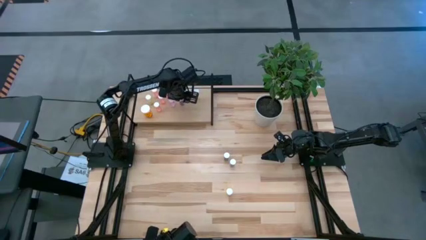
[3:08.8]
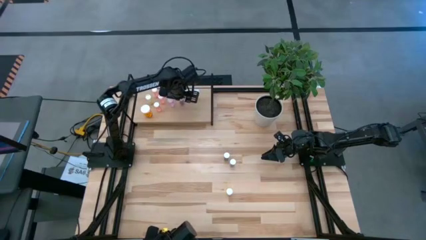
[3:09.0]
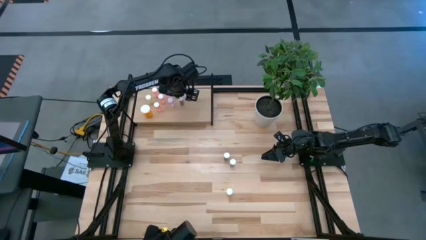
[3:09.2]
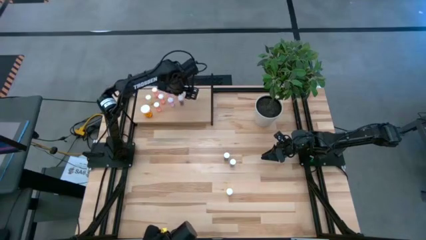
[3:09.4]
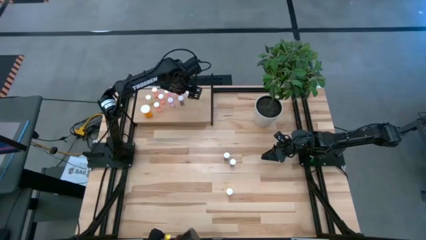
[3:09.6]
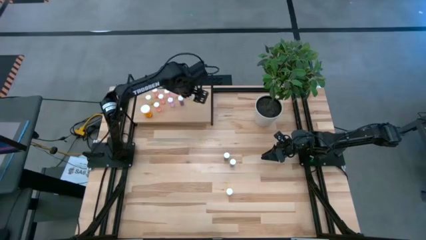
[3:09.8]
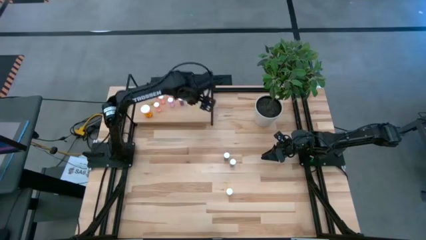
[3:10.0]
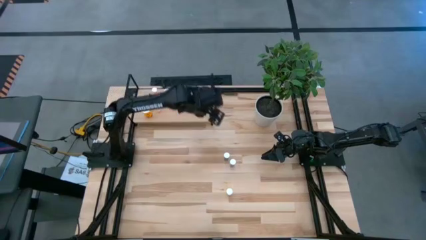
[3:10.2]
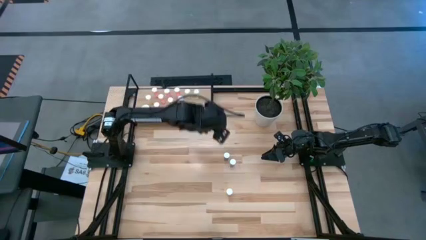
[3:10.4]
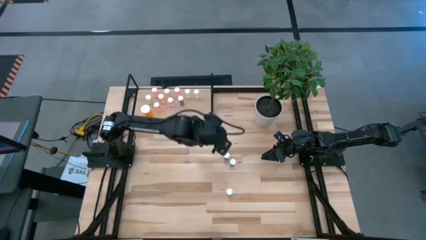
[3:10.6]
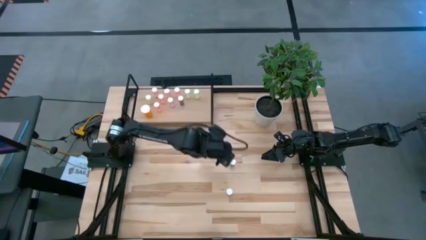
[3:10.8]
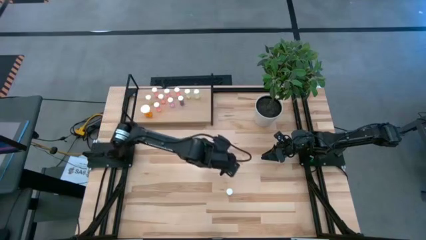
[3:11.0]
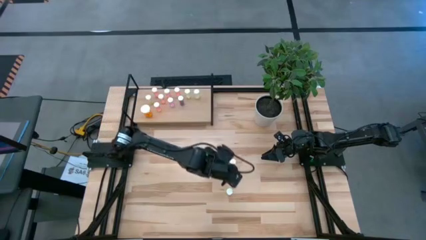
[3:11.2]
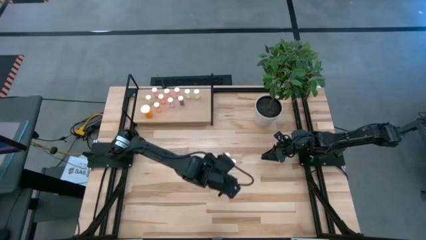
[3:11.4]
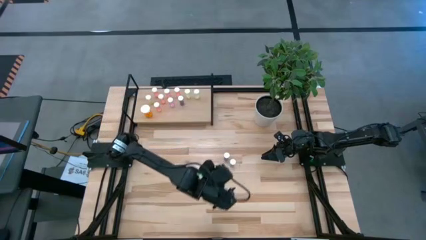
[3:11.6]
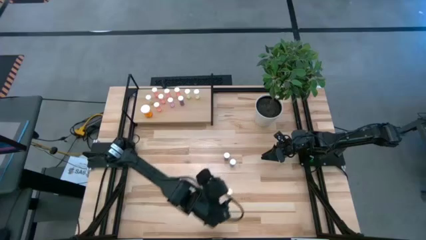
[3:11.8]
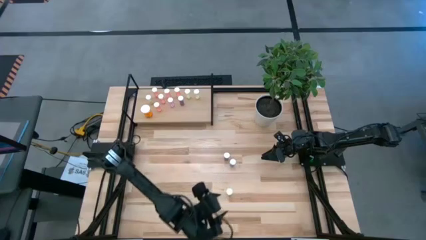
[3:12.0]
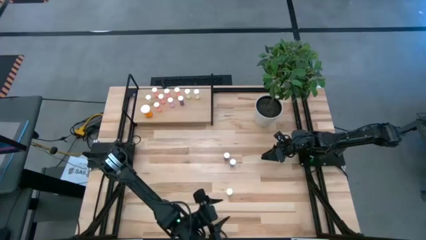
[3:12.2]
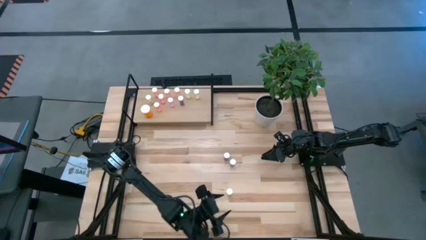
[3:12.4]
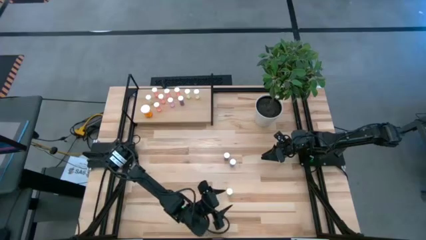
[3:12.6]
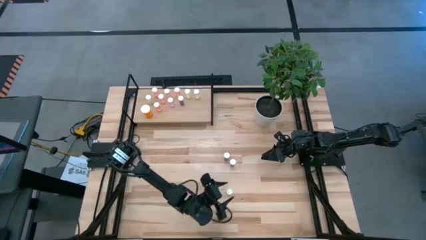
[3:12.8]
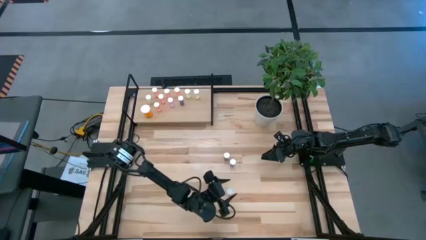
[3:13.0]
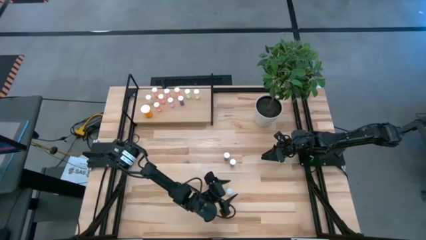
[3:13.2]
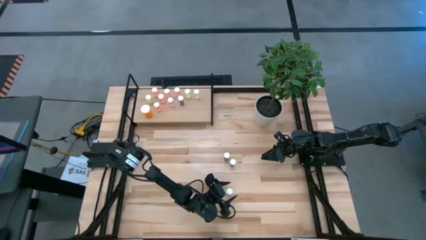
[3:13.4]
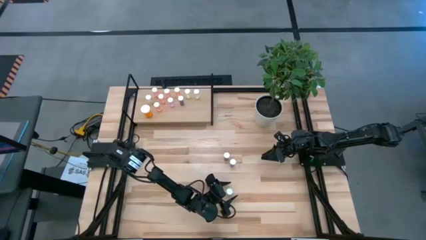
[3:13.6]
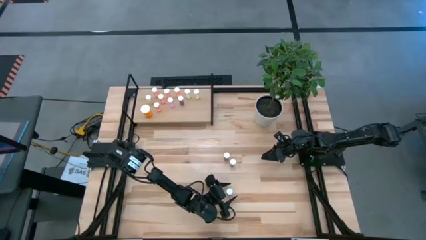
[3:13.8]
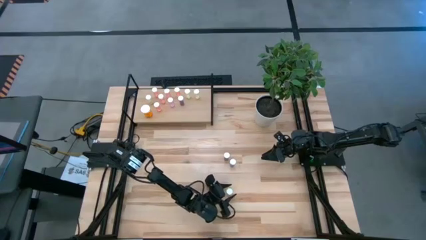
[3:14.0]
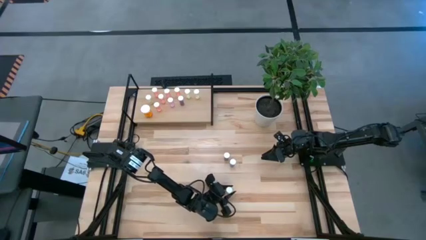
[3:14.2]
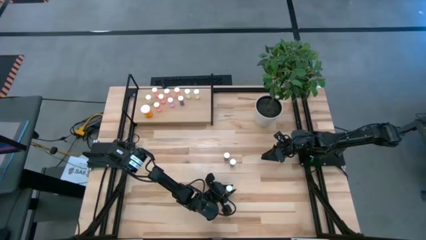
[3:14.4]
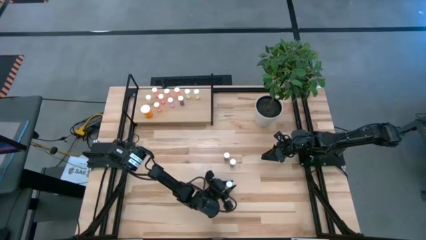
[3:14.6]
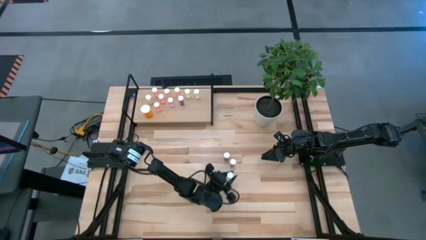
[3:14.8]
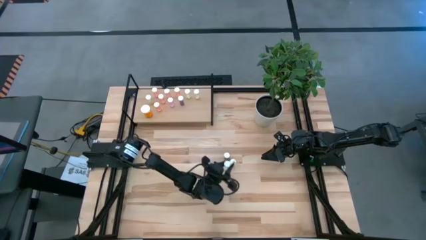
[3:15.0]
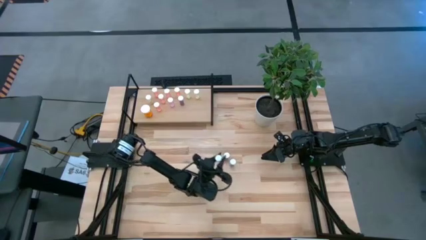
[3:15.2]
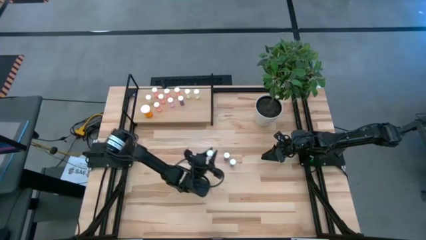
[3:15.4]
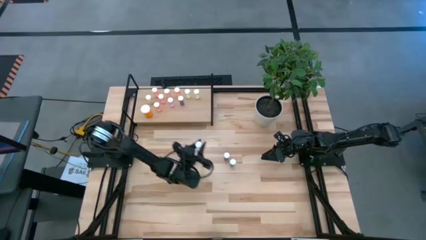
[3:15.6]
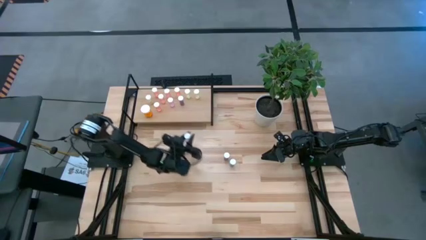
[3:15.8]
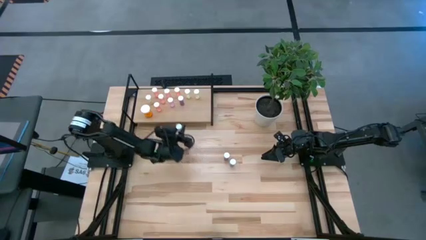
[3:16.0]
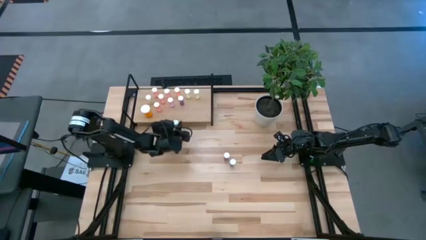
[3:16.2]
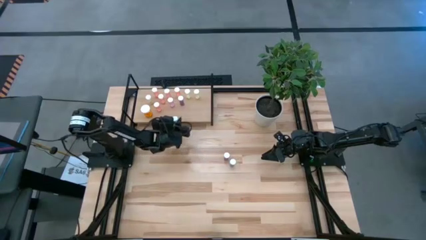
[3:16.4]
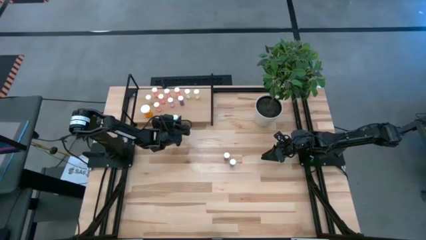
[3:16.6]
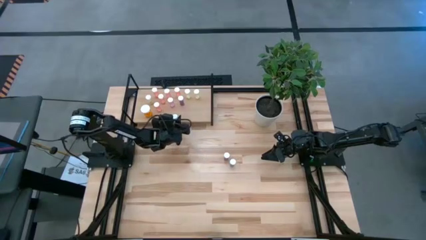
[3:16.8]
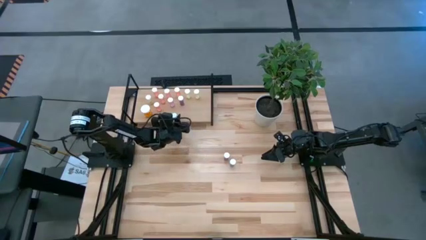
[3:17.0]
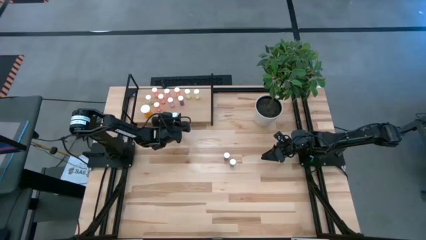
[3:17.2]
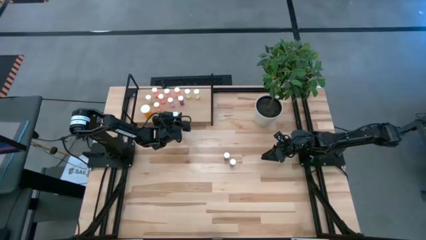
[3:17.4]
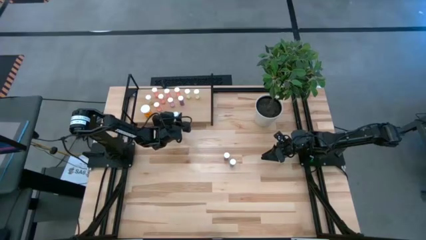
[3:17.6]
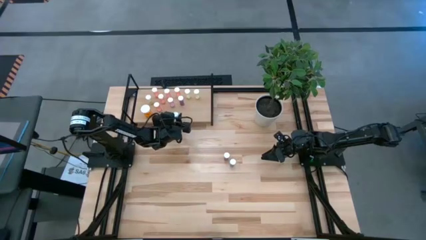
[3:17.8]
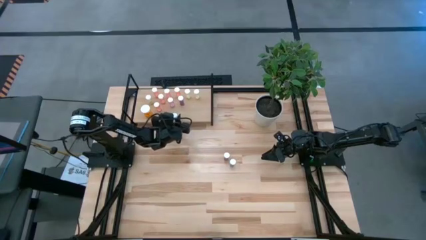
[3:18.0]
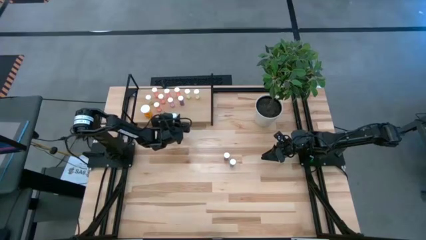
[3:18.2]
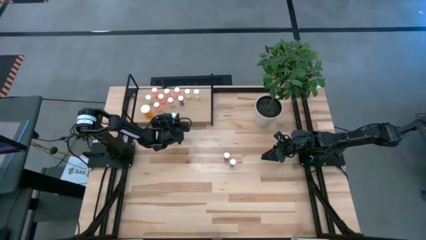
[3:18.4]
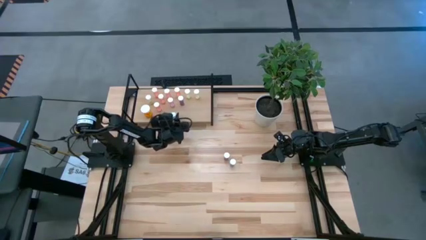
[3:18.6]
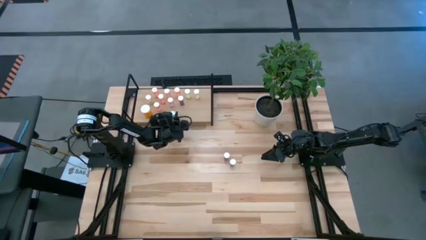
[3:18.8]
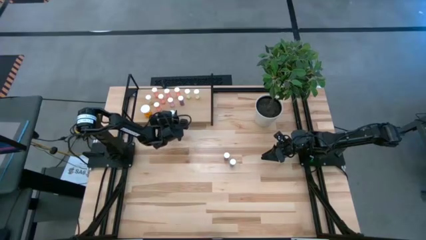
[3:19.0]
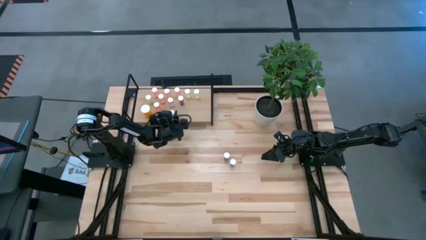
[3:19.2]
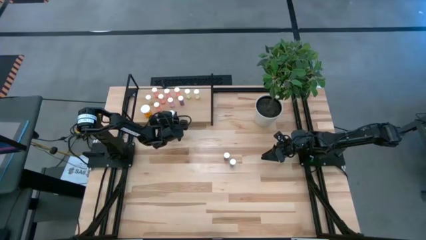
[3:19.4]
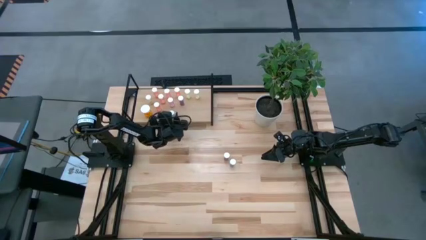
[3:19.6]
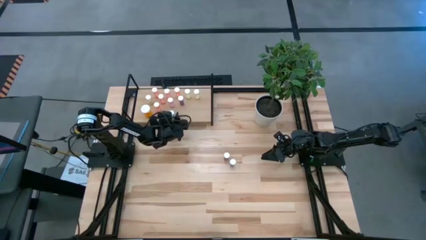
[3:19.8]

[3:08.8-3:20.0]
Task: Pick and place medicine bottles onto shelf by color
Put the yellow pill bottle on the shelf
